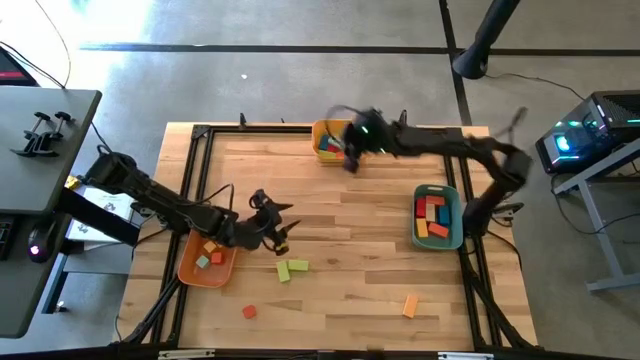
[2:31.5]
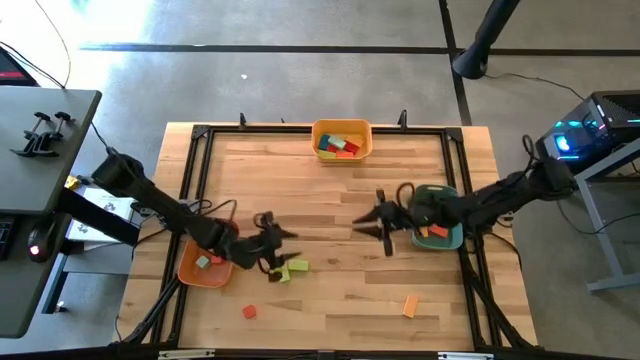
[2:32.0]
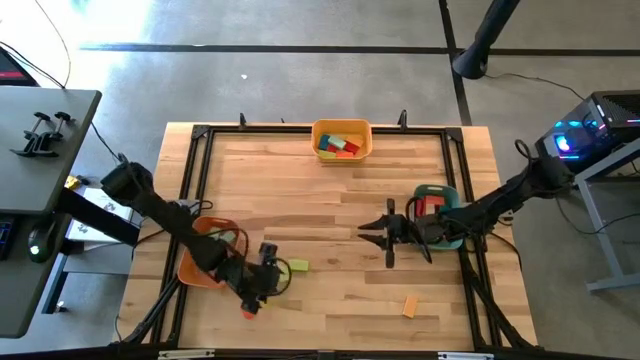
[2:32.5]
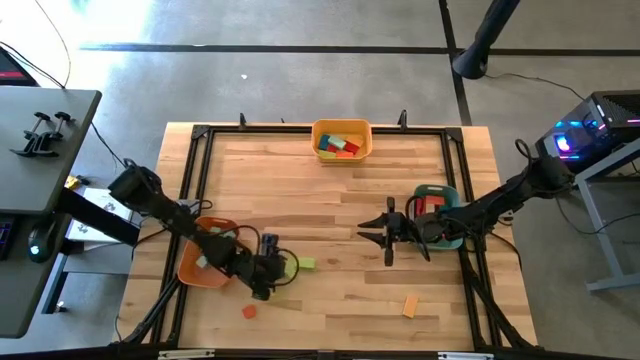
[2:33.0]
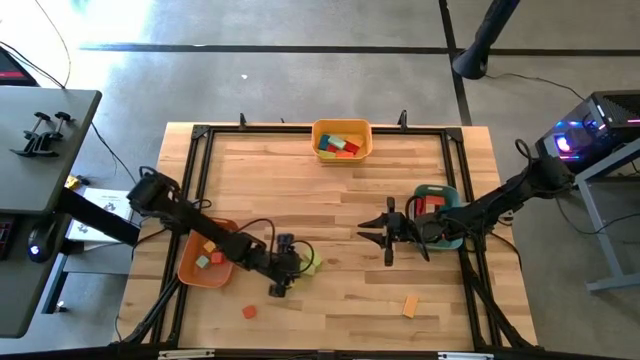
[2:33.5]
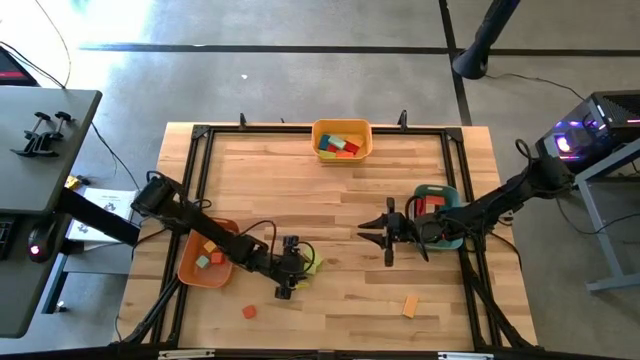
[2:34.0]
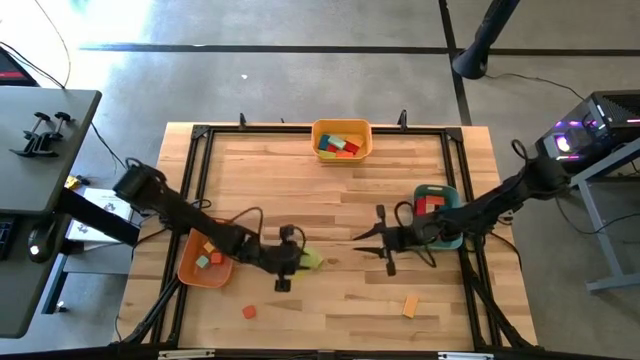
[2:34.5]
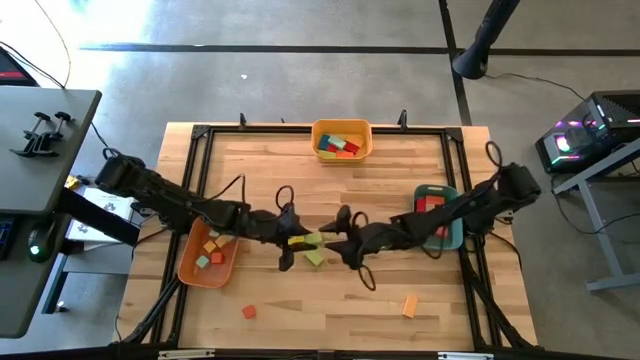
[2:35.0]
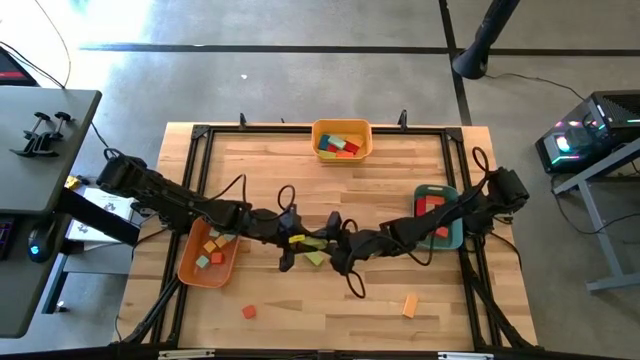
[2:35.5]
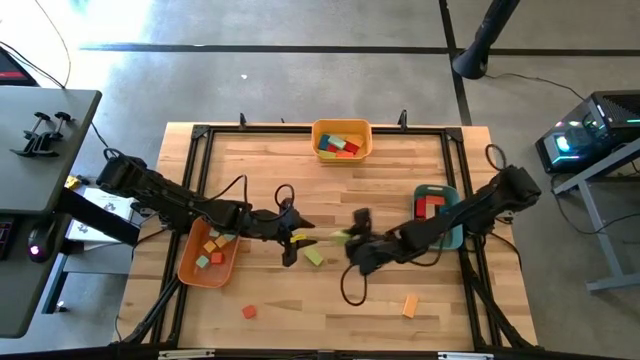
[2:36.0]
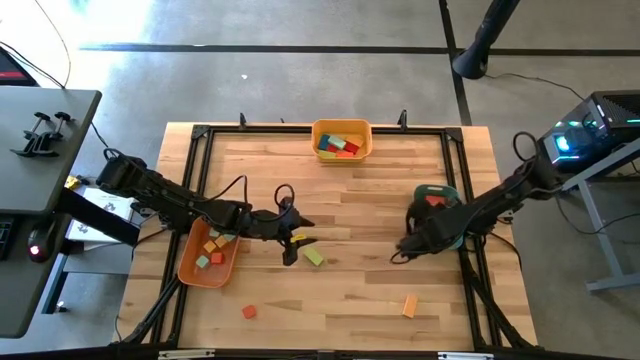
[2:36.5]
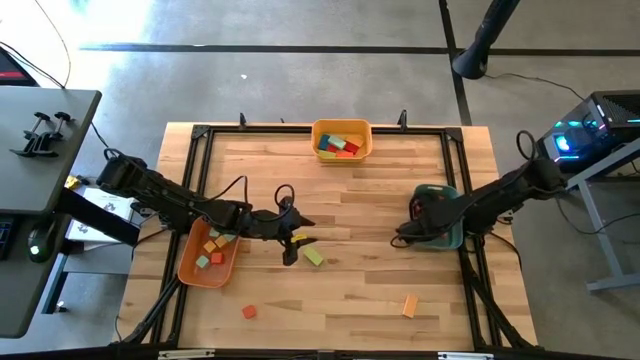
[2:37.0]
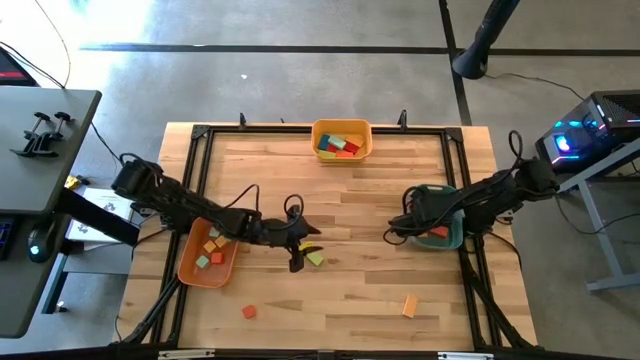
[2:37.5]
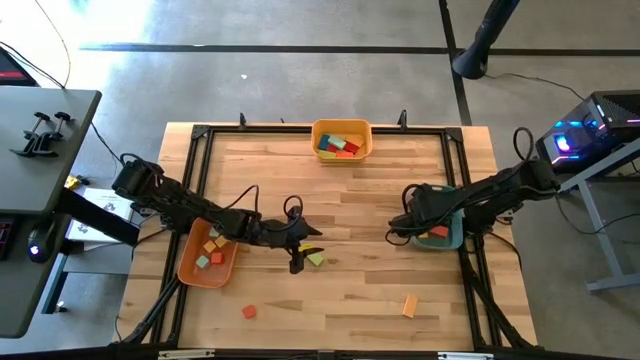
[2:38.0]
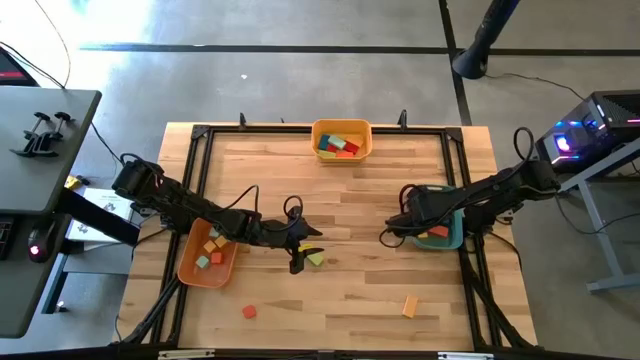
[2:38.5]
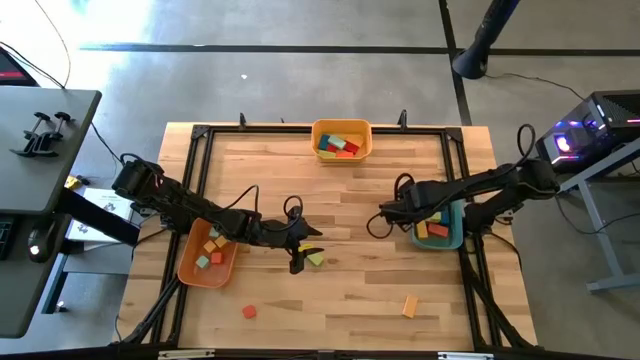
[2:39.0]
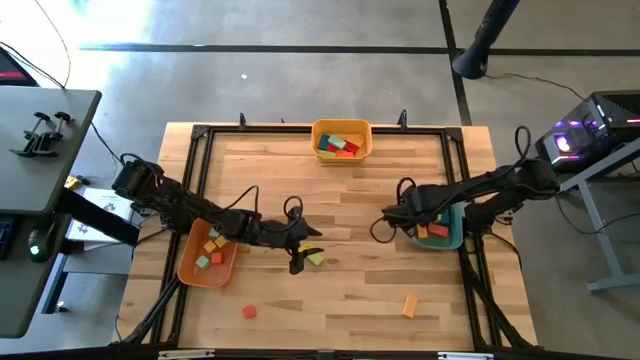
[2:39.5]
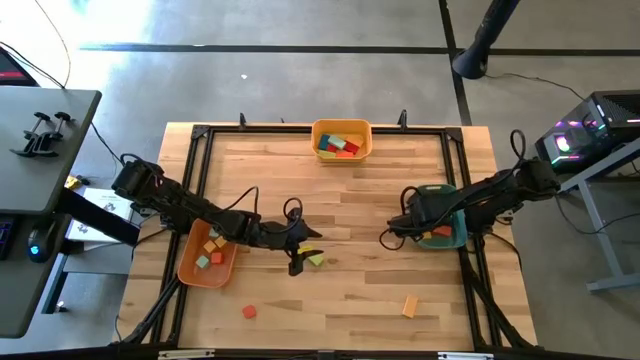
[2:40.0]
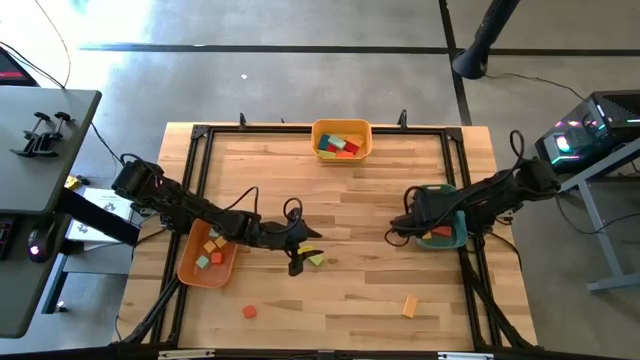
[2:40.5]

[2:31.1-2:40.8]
Task: Sort blocks by size
Put the green thick rectangular block into the blue bin

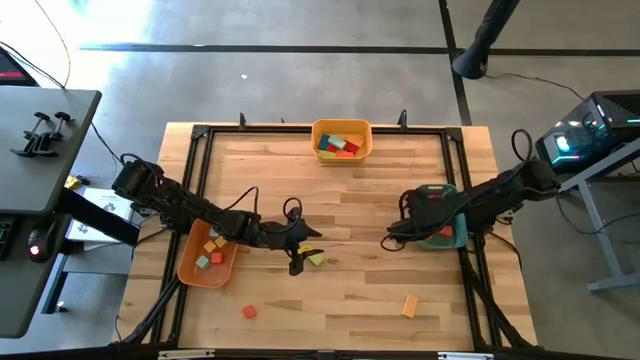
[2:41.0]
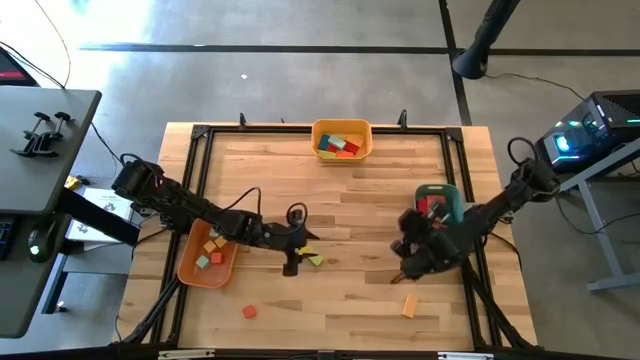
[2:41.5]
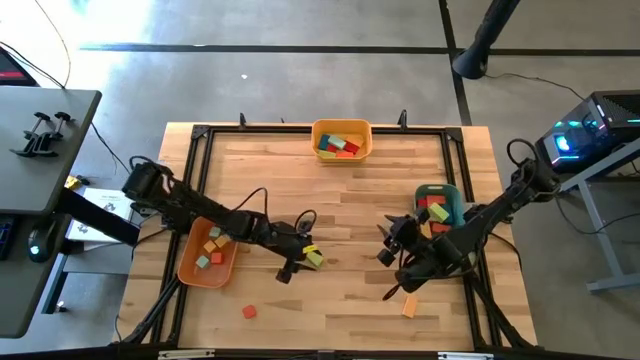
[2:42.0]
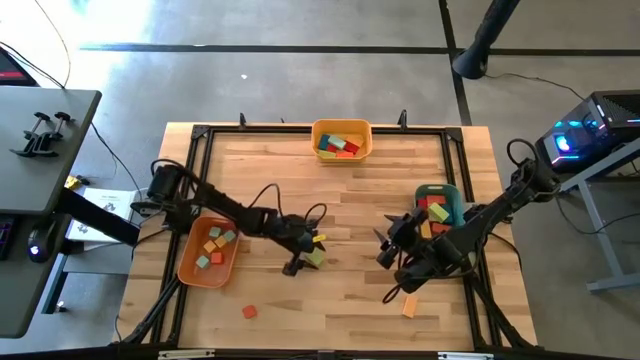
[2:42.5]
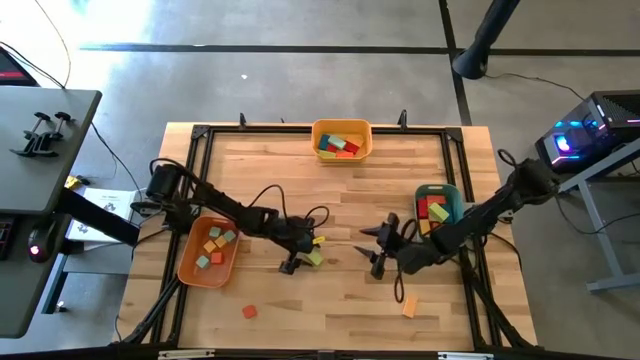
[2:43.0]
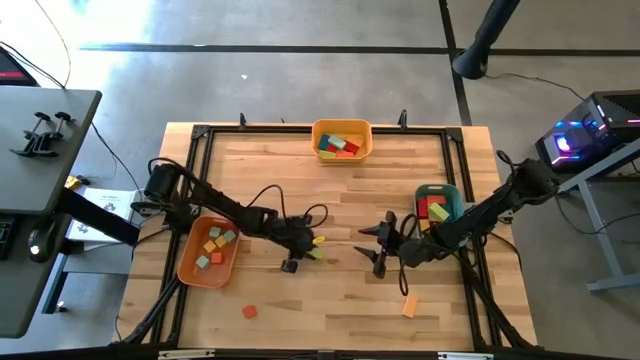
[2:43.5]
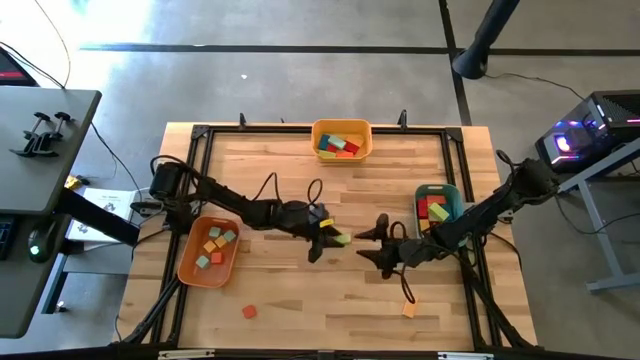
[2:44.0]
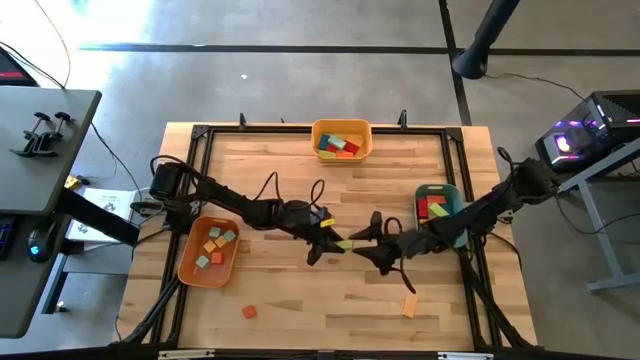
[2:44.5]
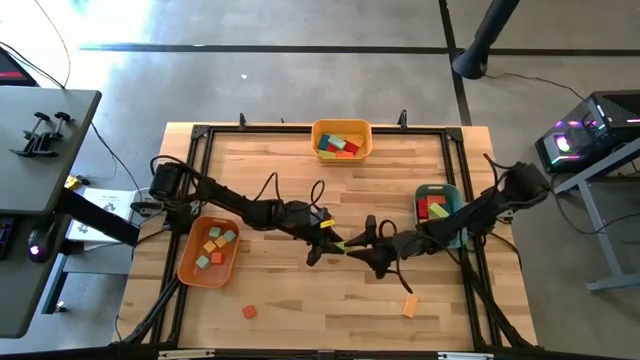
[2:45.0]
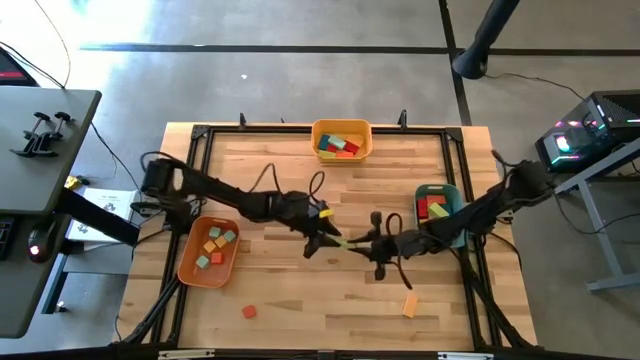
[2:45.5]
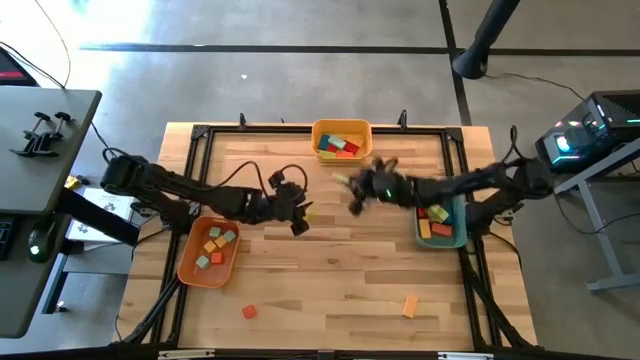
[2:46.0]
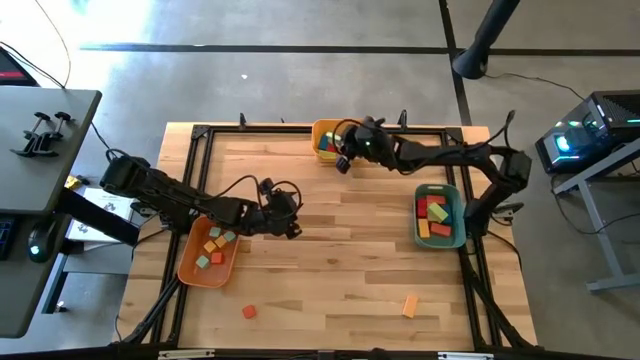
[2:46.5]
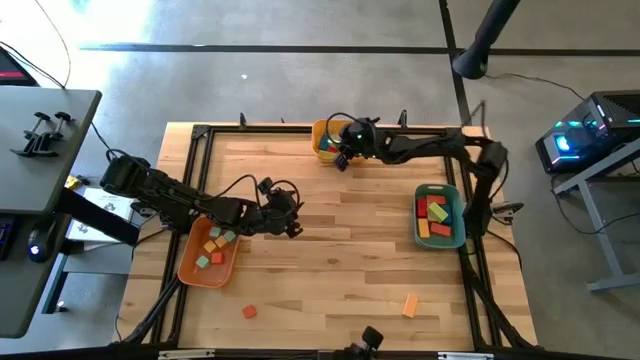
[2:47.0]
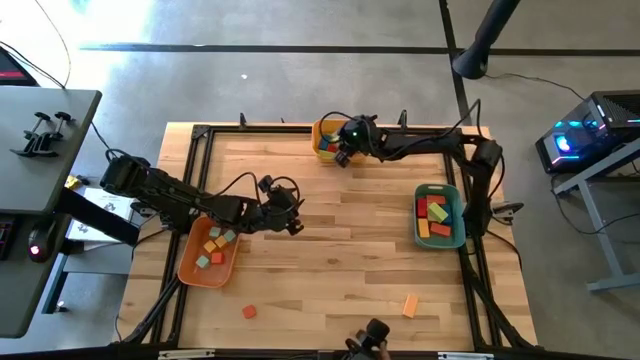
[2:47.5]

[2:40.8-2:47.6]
Put the green thin rectangular block into the yellow bin

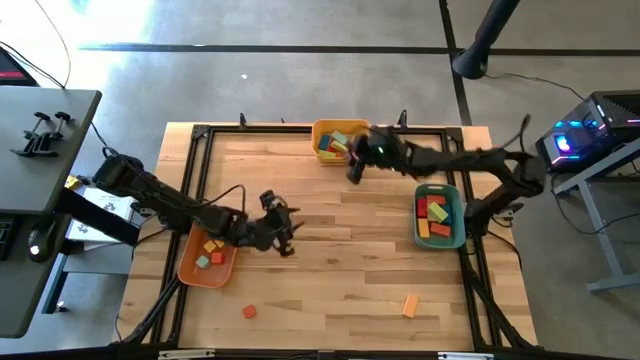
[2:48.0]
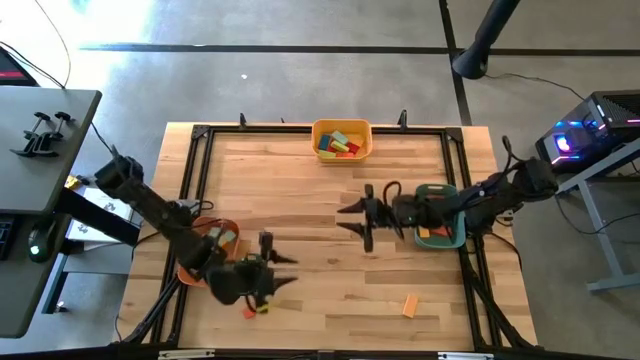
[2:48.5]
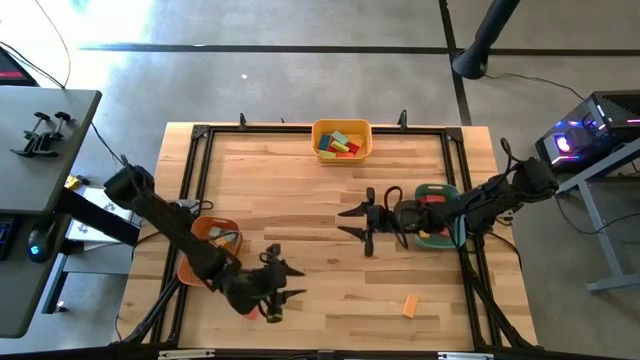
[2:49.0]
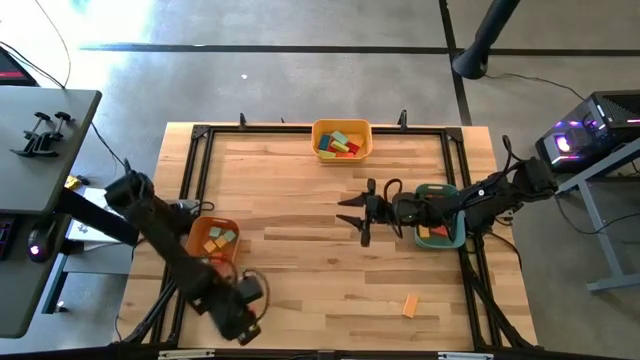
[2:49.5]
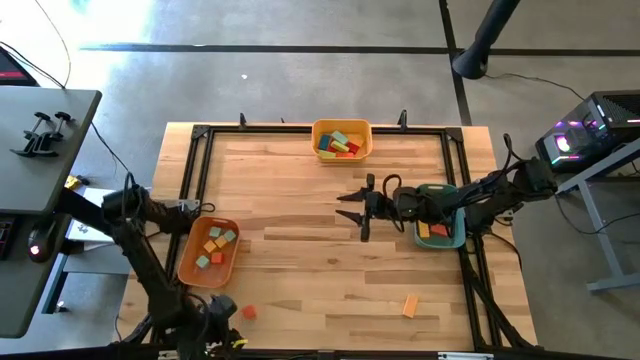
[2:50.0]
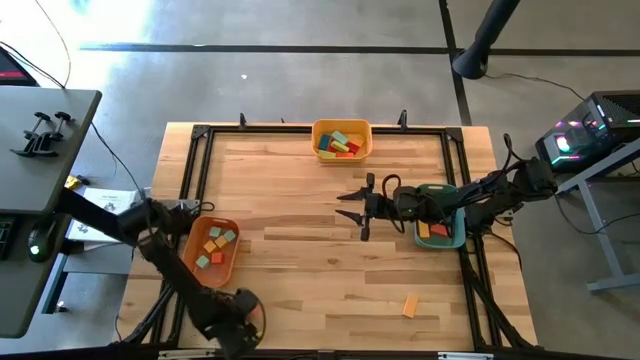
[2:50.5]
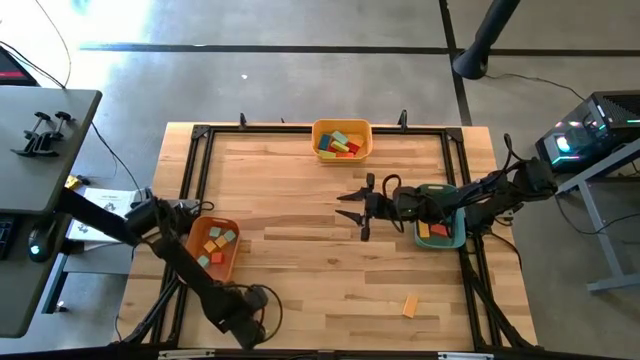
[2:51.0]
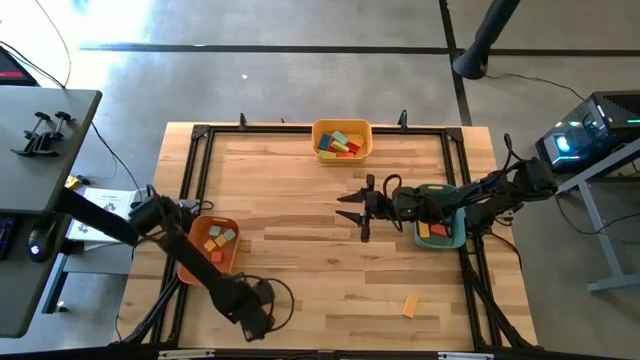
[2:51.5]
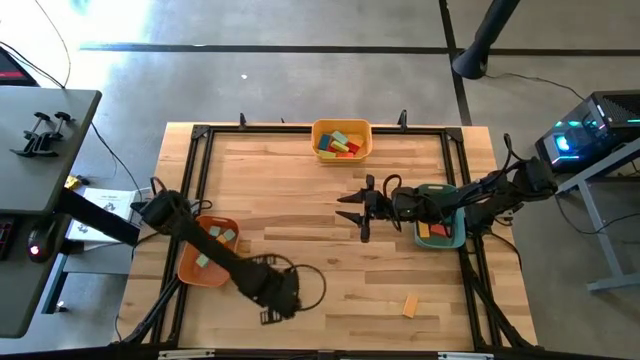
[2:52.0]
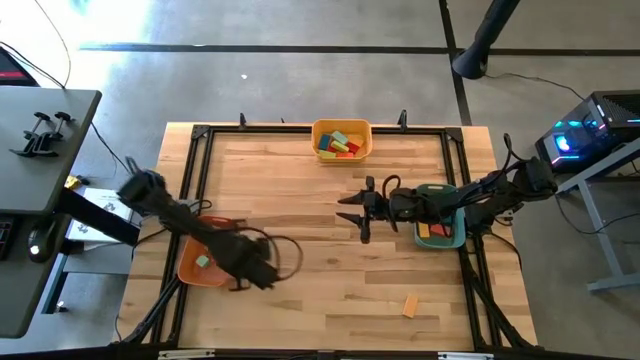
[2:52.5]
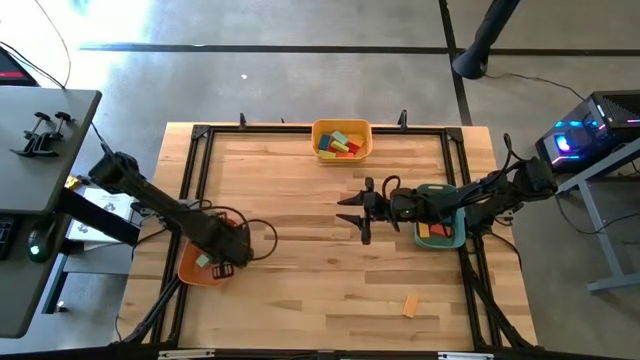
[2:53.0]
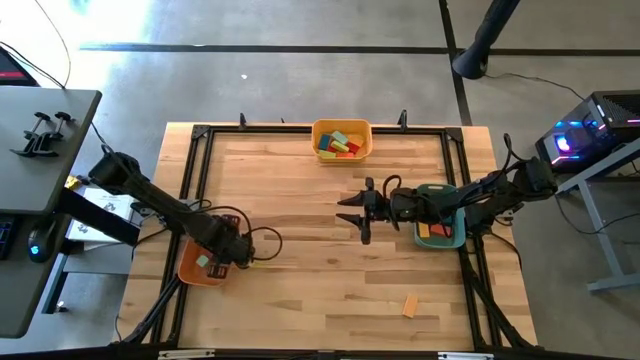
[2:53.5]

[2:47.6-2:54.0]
Put the orange square block into the orange bin
